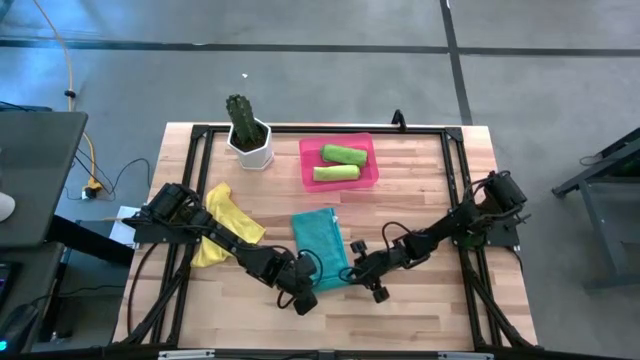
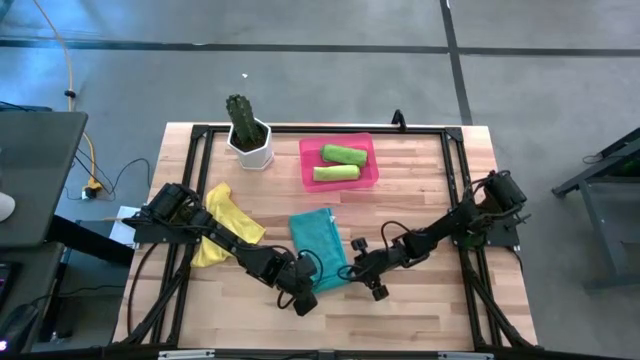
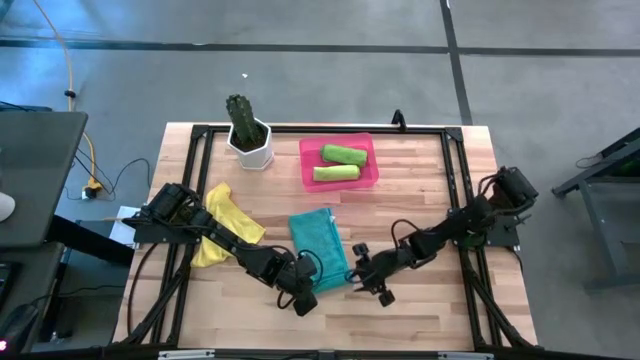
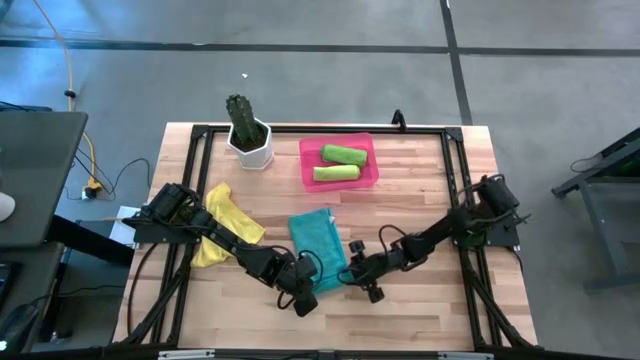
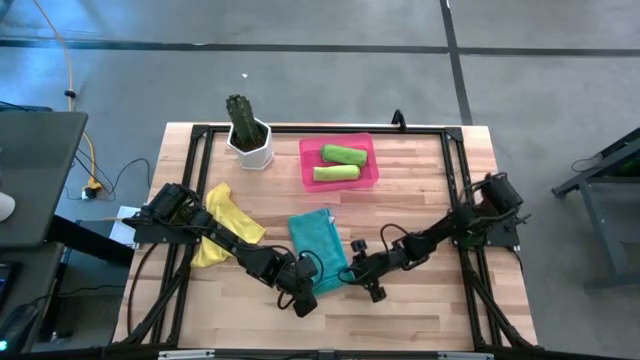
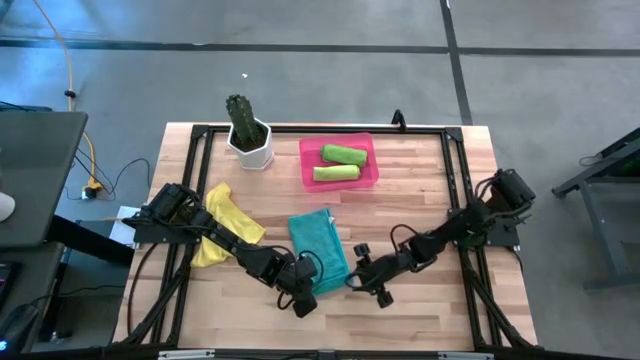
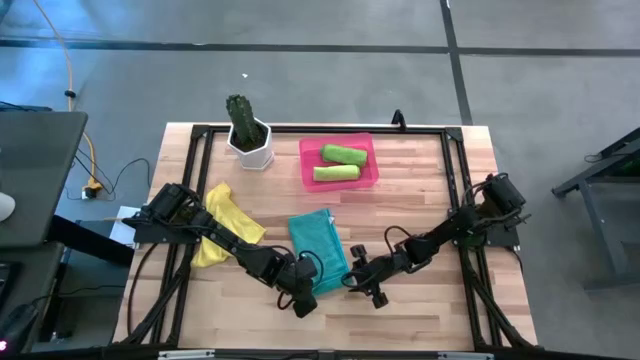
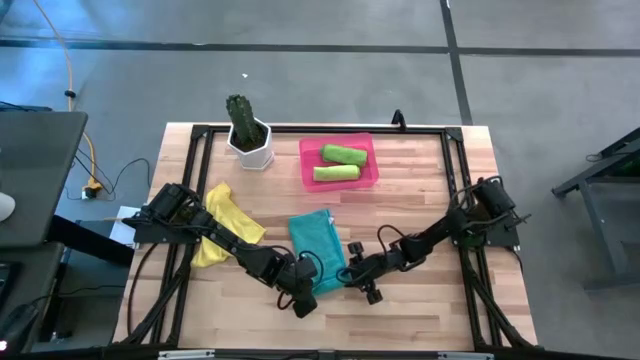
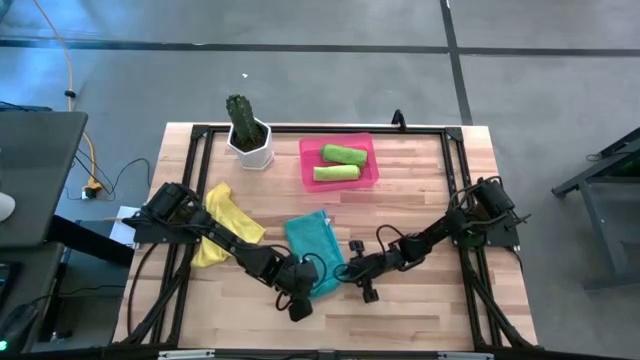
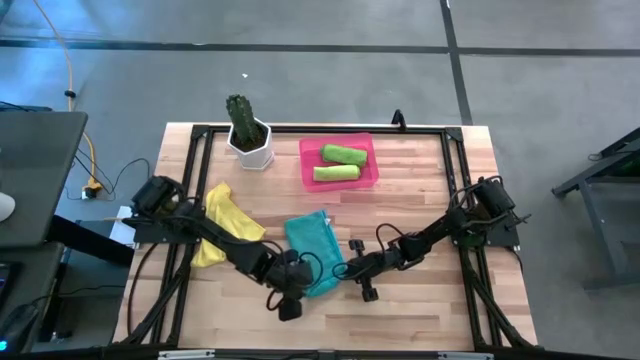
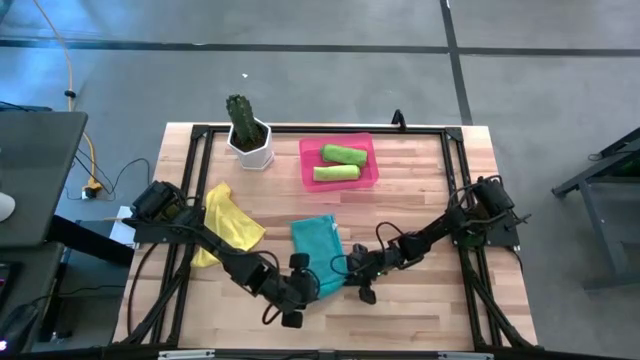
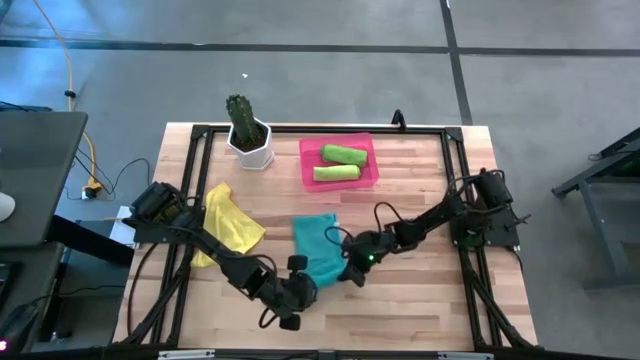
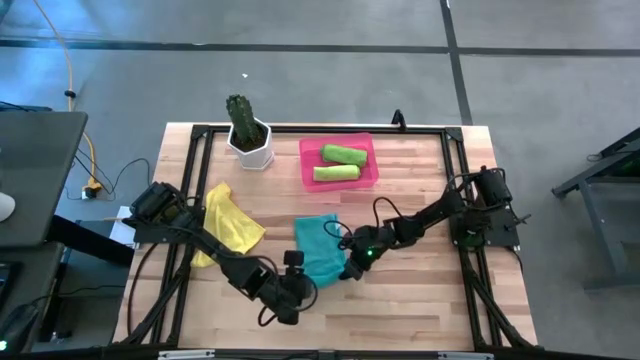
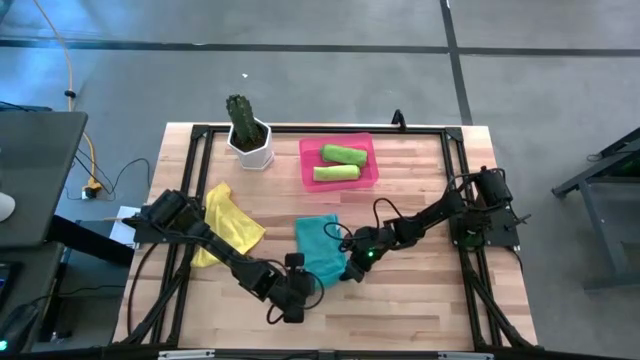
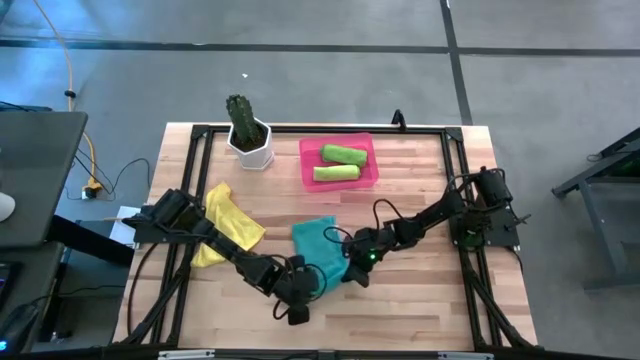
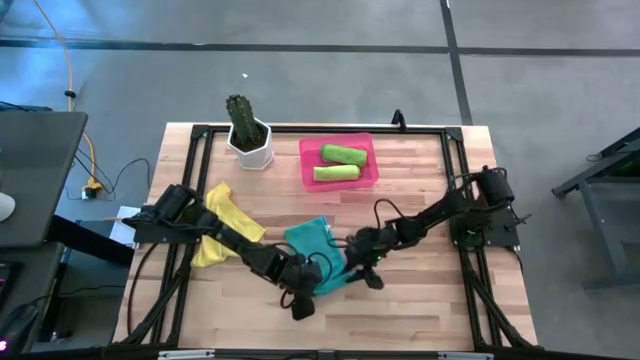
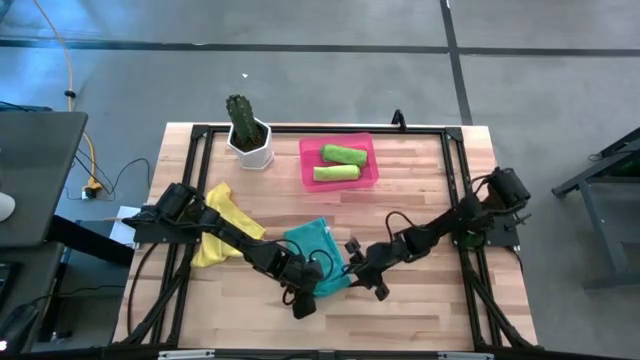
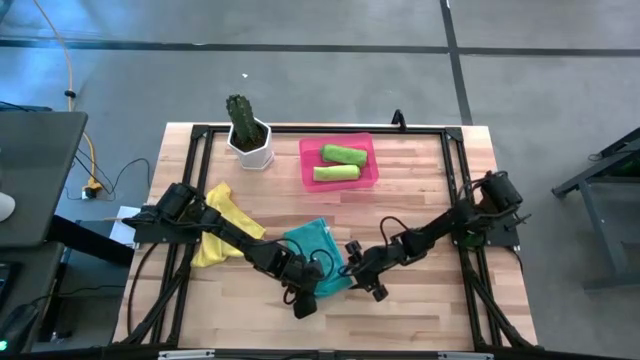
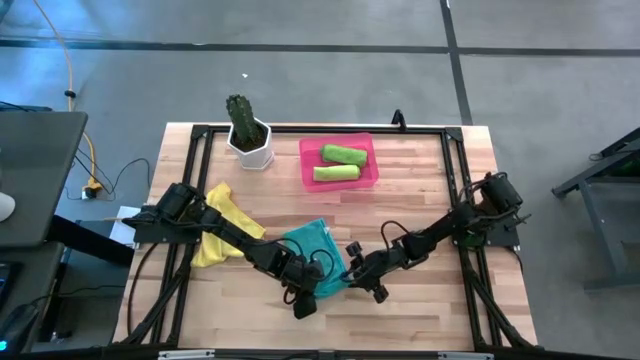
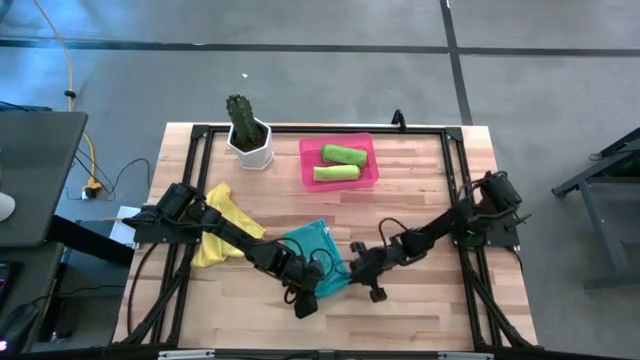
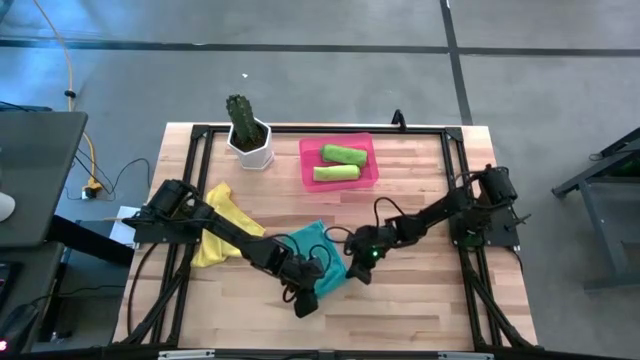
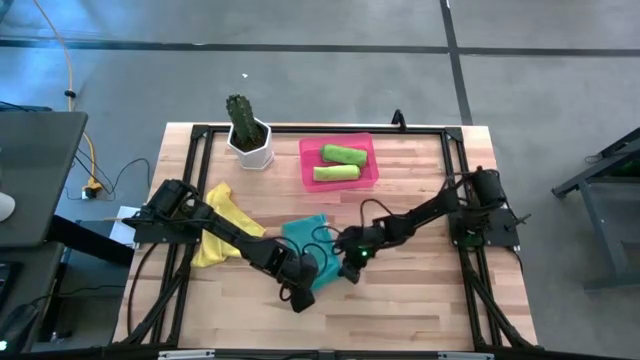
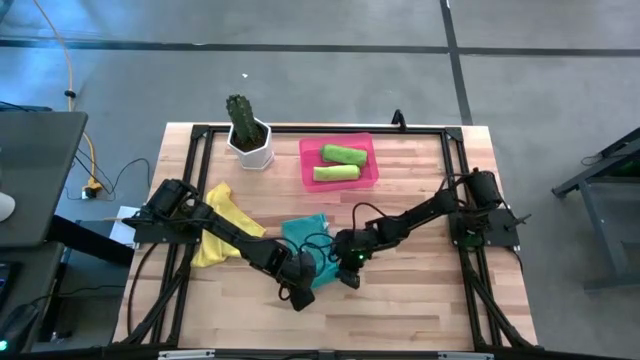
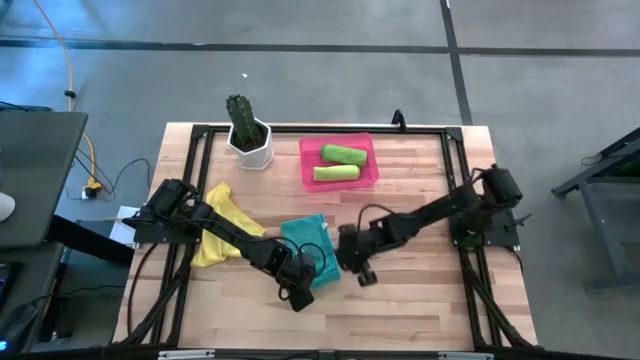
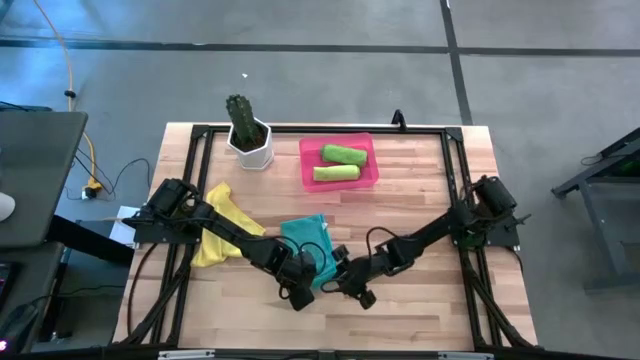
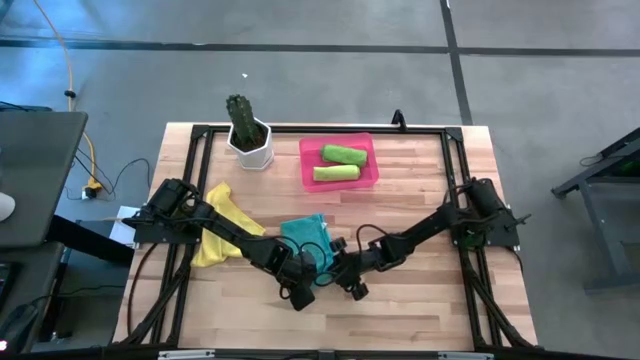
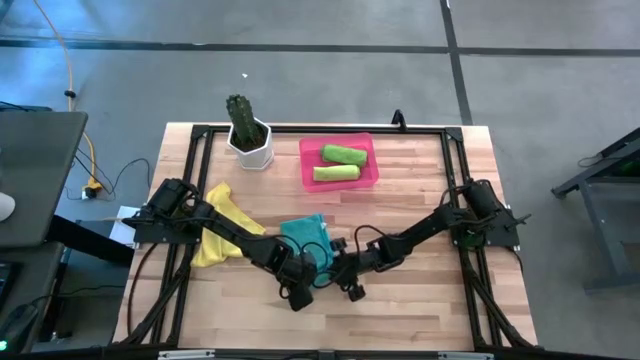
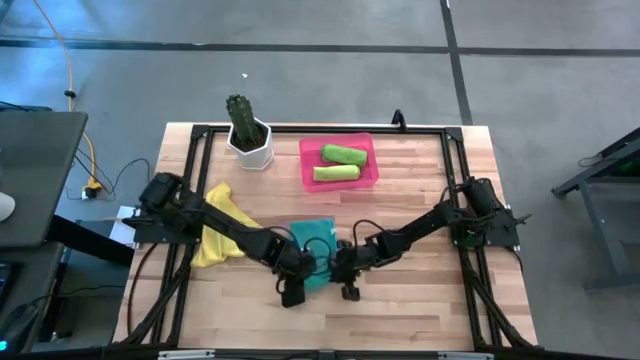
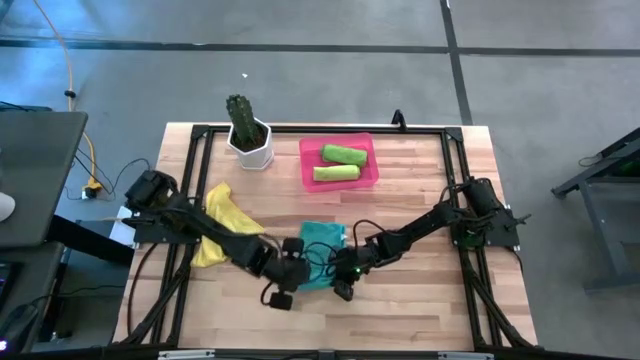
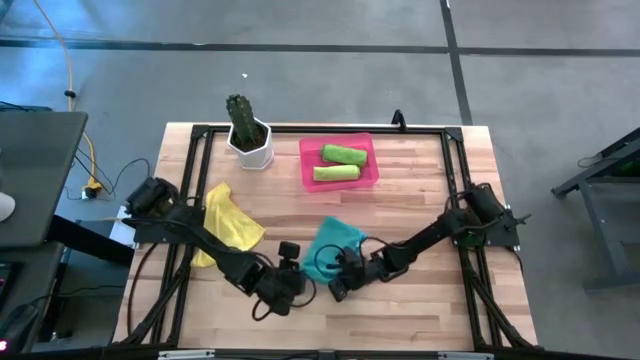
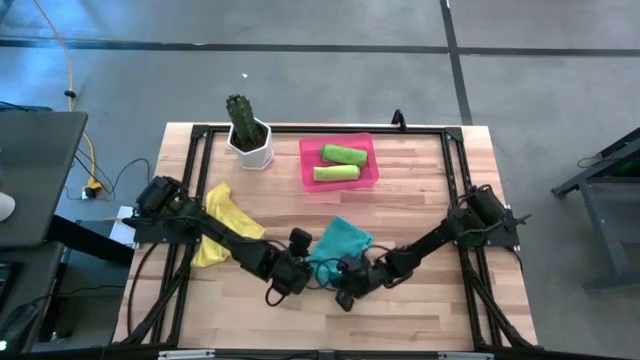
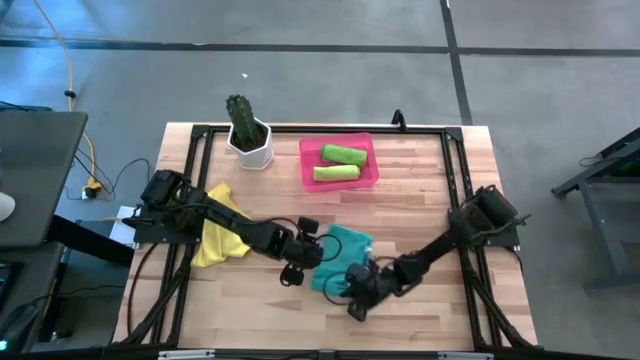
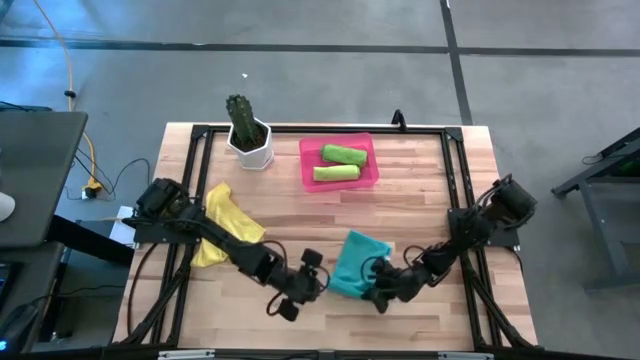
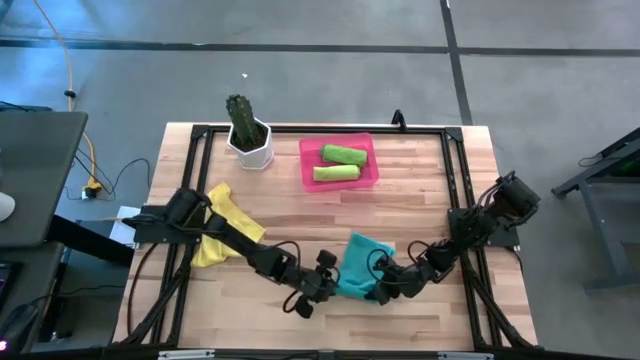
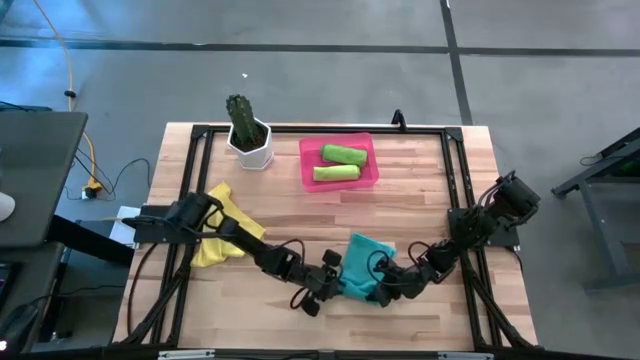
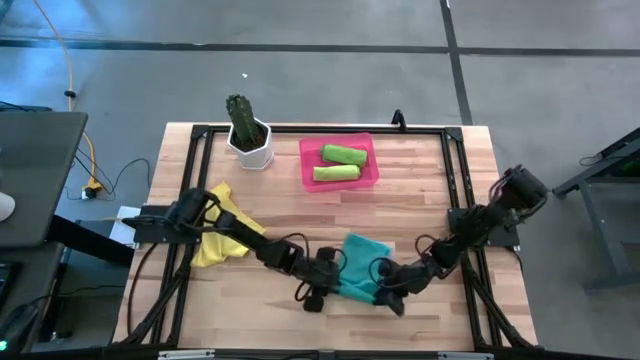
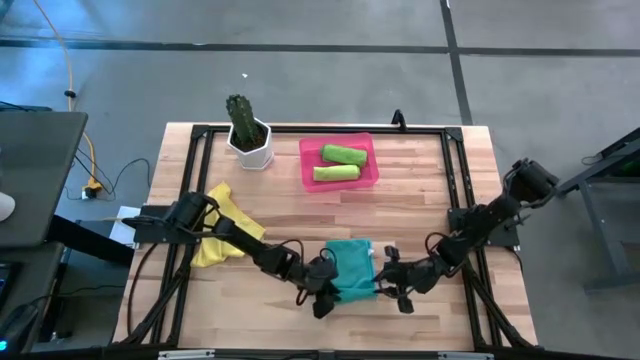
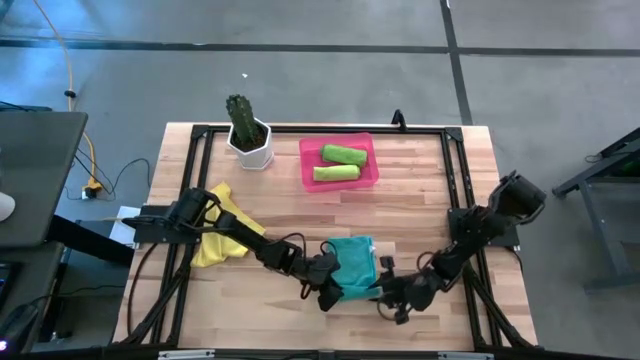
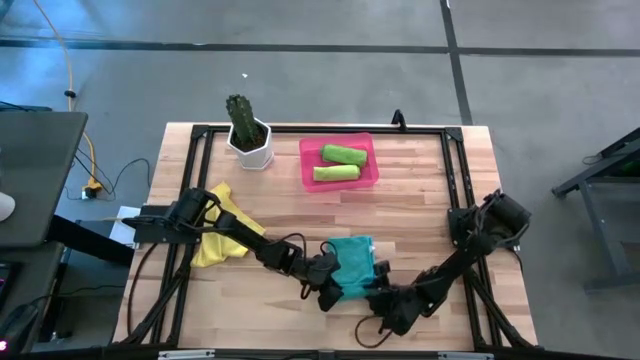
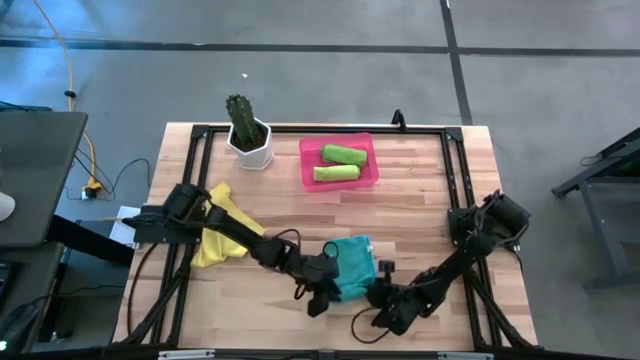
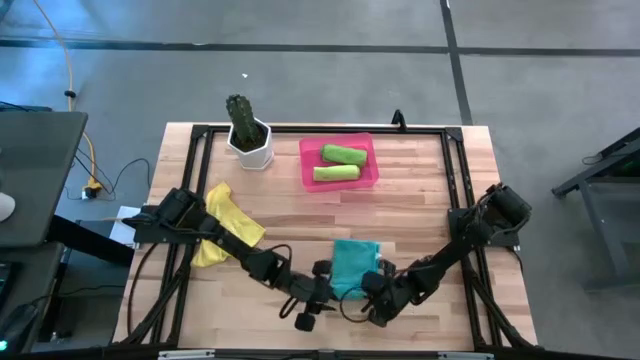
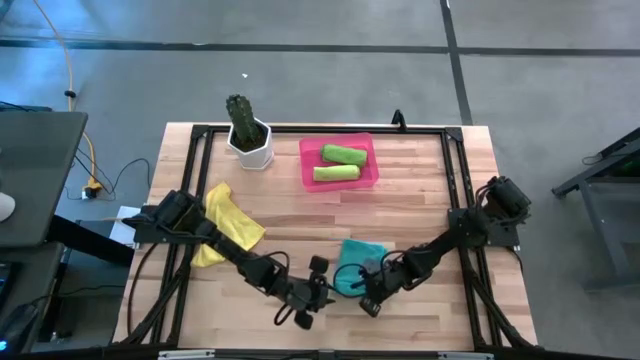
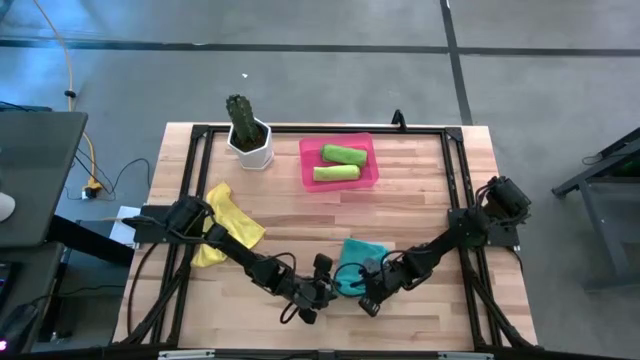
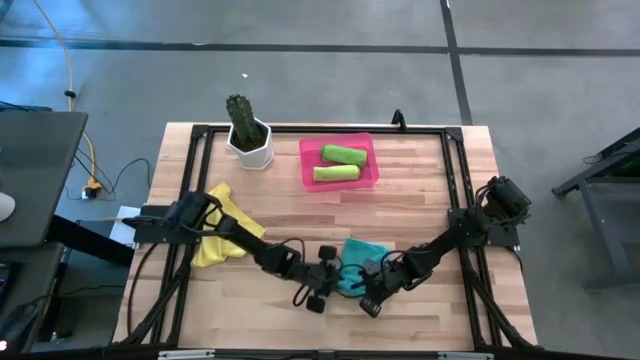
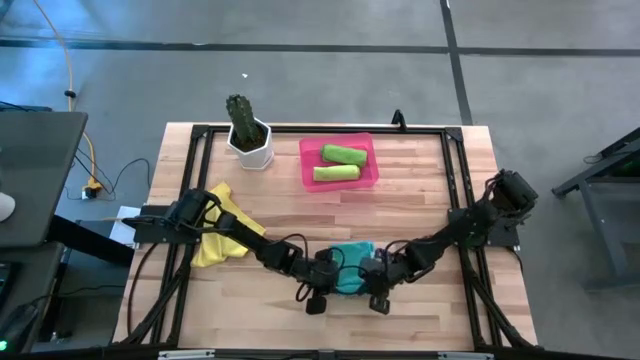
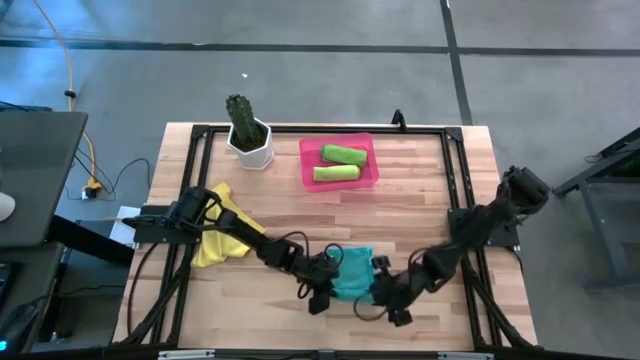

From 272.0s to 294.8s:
Task: Roll microfiber towels into tight, uniform cylinder then place into a basket
Roll the blue microfiber cloth
